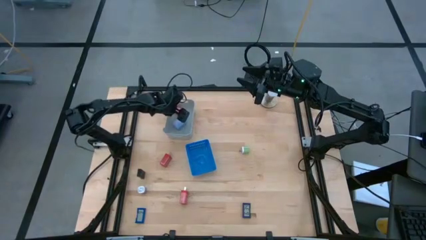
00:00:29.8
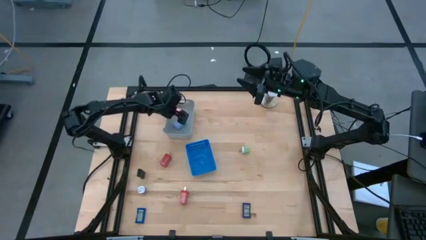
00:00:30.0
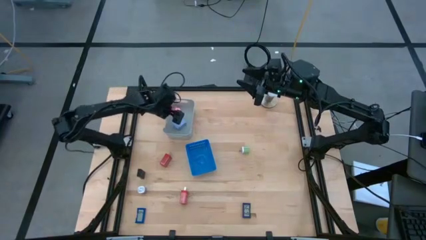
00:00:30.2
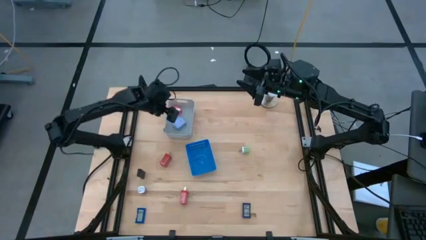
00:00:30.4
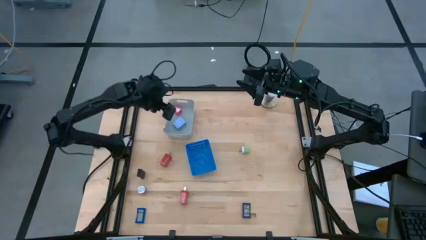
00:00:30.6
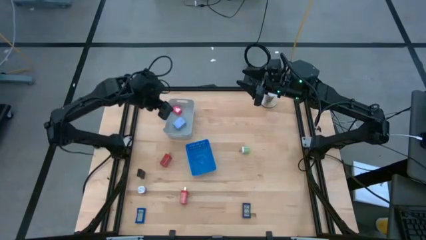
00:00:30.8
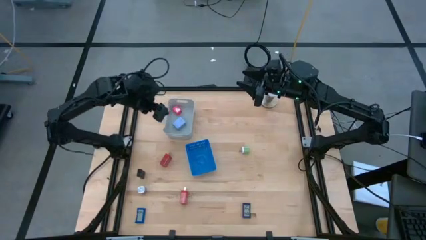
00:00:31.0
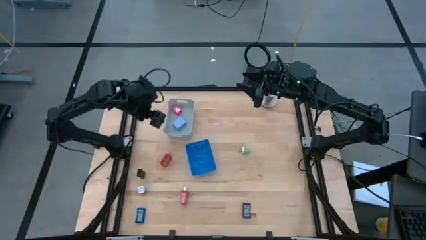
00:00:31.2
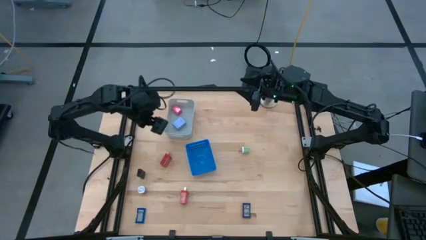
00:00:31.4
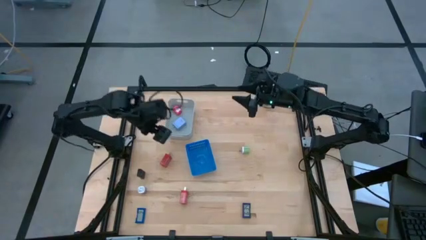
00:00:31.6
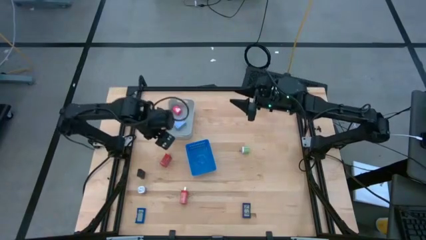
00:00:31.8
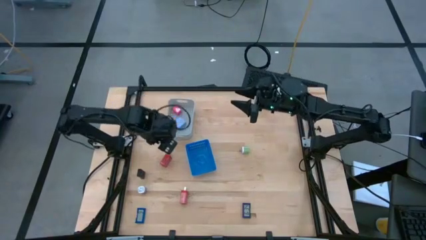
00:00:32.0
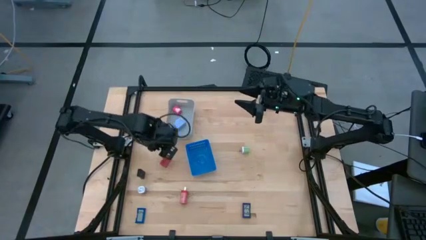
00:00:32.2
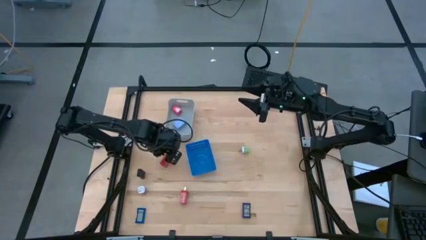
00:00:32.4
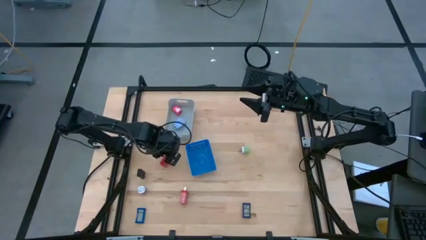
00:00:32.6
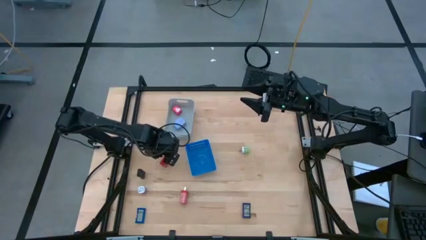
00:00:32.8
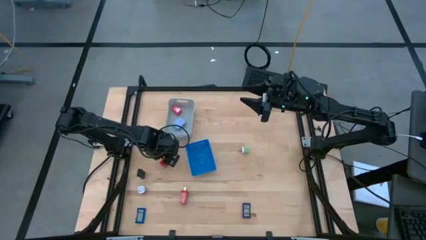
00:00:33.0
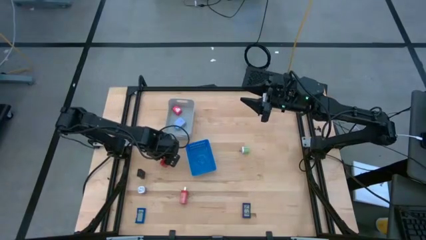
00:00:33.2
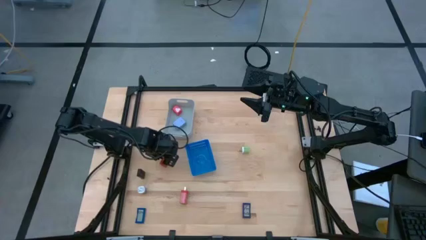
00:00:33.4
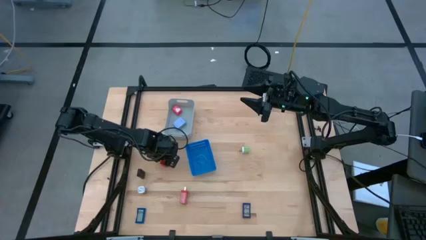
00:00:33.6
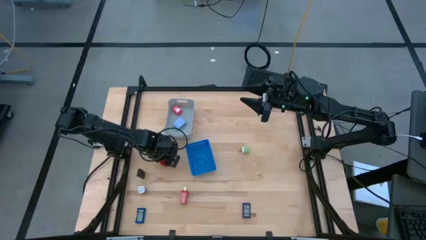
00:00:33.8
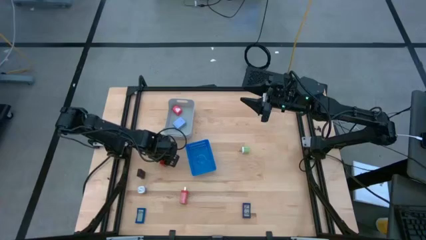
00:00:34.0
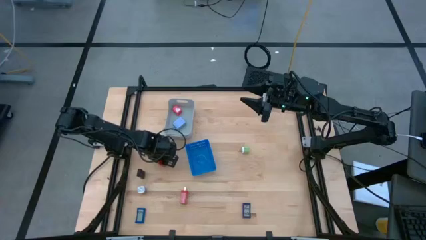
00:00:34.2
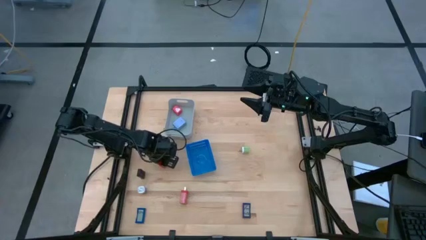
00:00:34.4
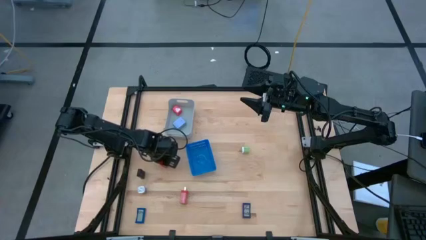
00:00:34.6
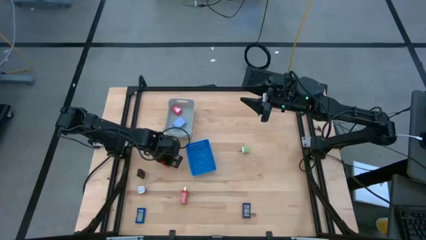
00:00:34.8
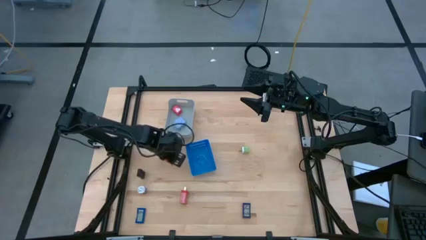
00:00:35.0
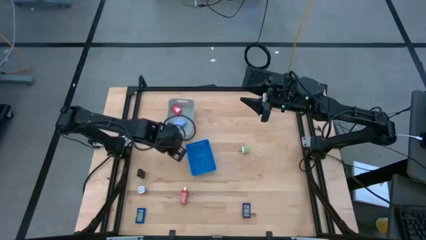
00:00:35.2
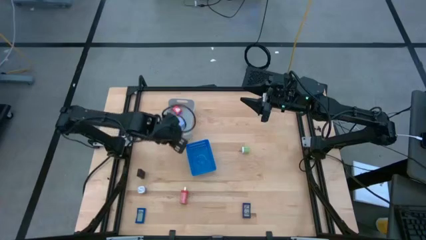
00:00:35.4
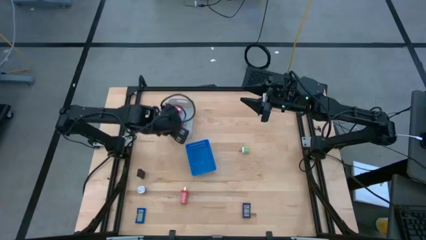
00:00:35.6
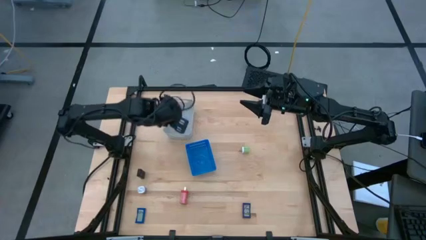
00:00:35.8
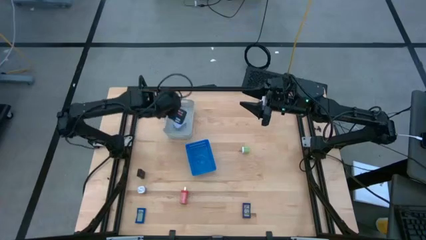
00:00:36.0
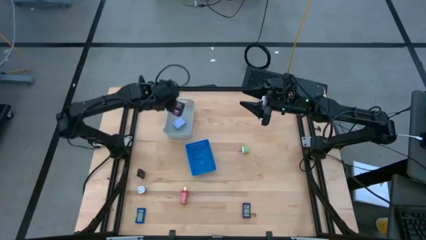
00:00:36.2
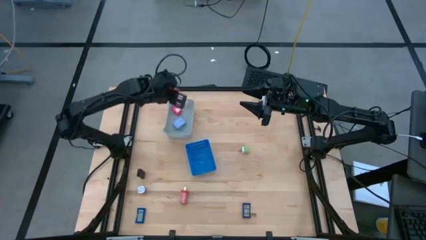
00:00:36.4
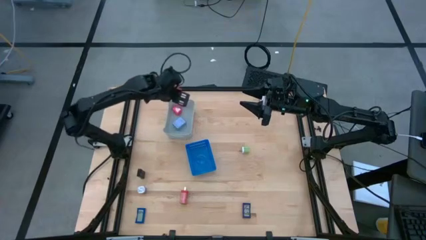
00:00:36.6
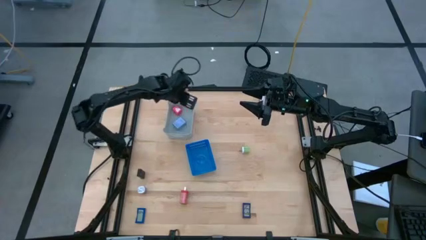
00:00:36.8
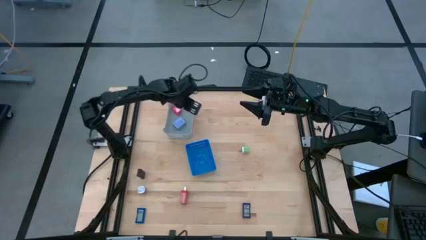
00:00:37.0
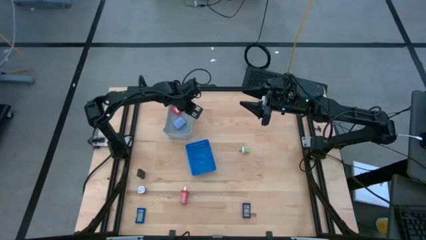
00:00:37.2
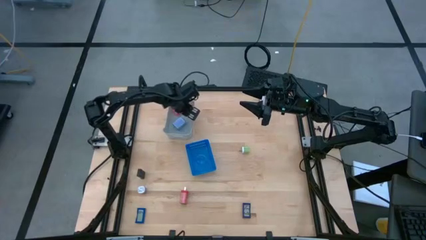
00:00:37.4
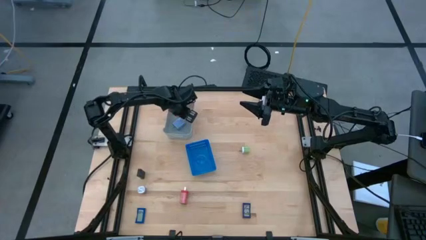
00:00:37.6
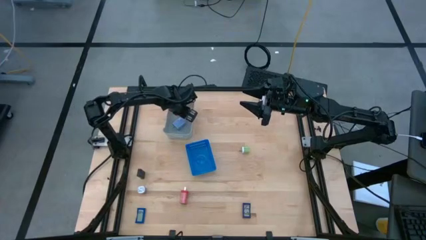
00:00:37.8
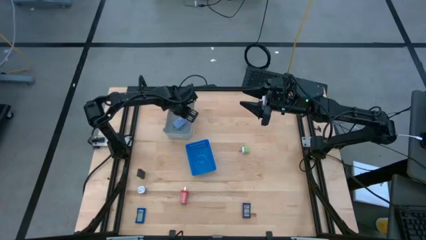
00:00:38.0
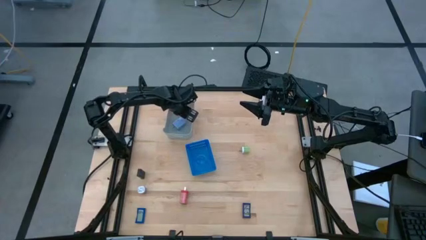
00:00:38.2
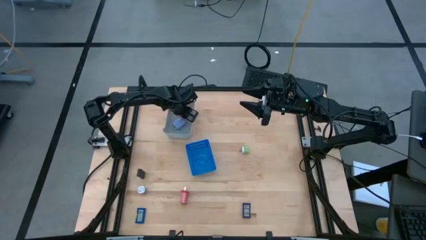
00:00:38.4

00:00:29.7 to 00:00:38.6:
Task: Pick & Place Office items
Put the top red charger adapter into the gray bin

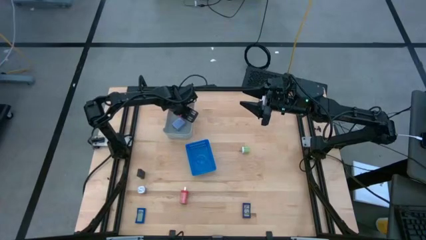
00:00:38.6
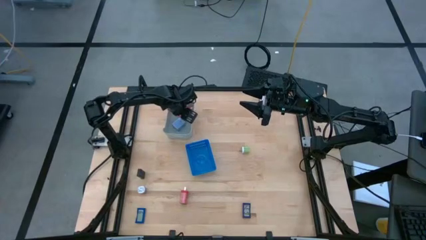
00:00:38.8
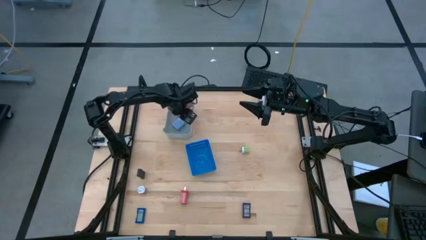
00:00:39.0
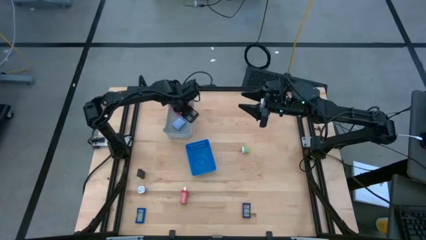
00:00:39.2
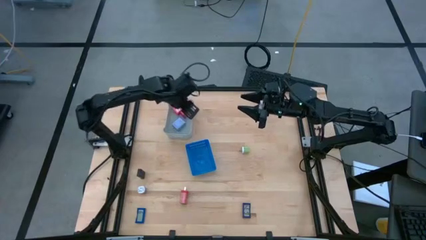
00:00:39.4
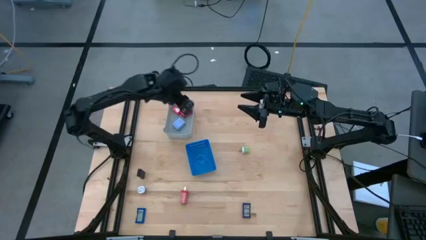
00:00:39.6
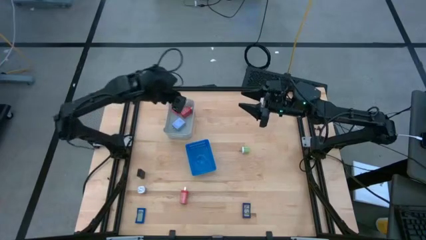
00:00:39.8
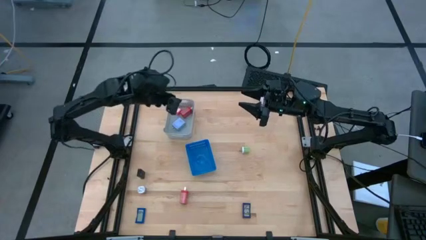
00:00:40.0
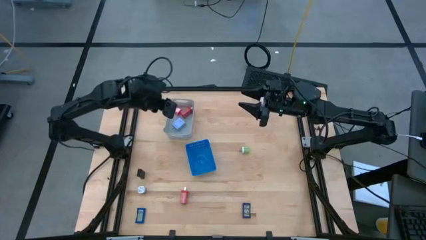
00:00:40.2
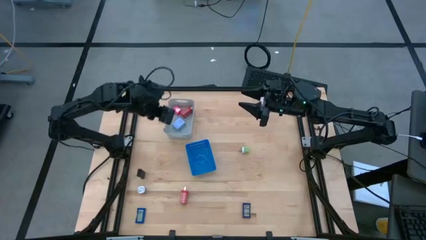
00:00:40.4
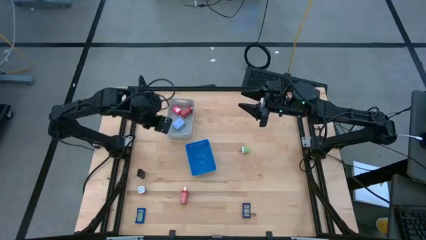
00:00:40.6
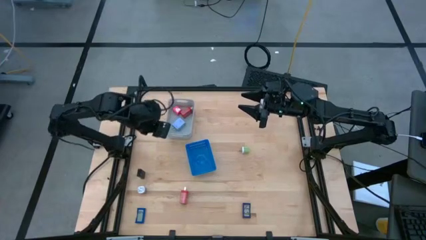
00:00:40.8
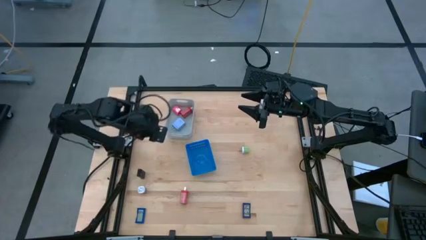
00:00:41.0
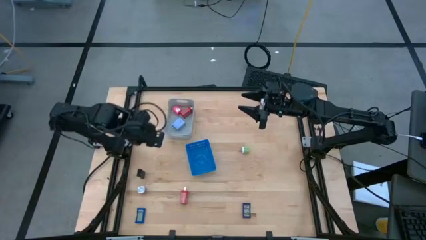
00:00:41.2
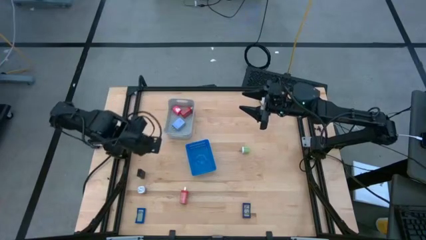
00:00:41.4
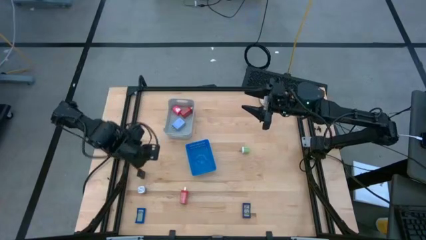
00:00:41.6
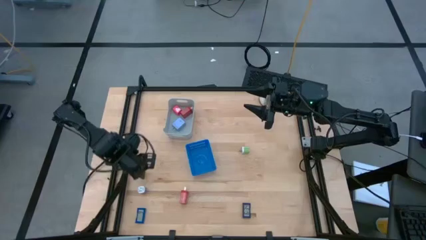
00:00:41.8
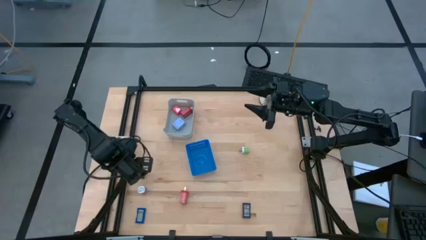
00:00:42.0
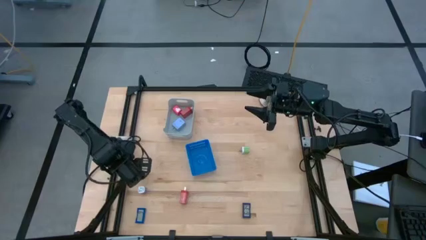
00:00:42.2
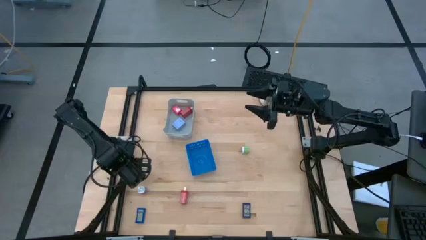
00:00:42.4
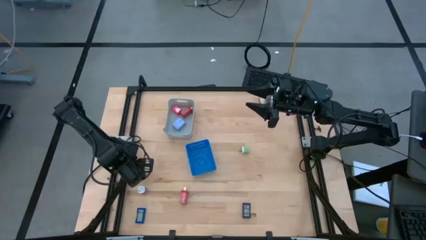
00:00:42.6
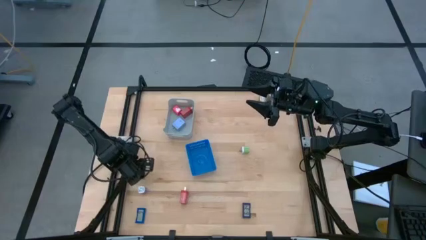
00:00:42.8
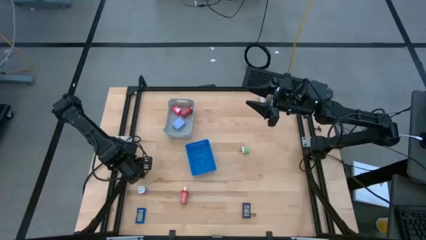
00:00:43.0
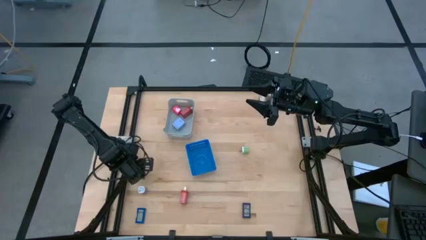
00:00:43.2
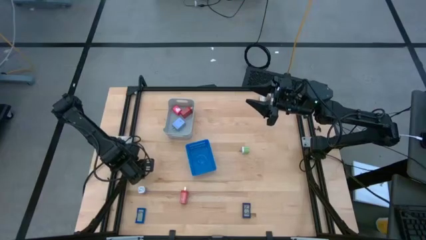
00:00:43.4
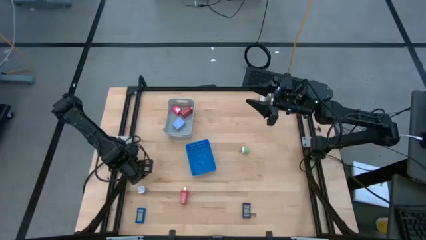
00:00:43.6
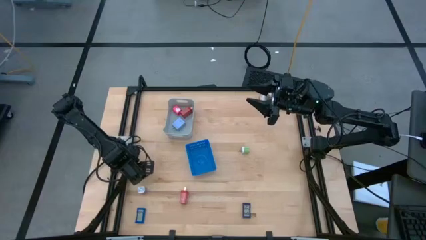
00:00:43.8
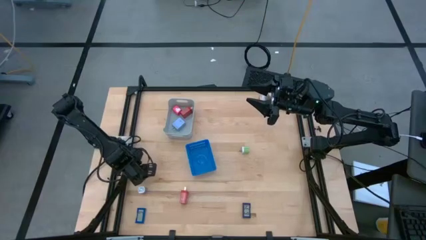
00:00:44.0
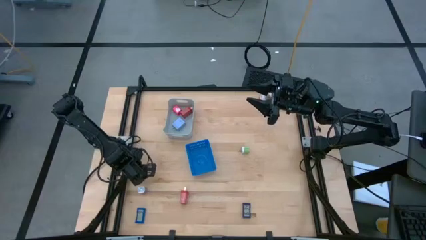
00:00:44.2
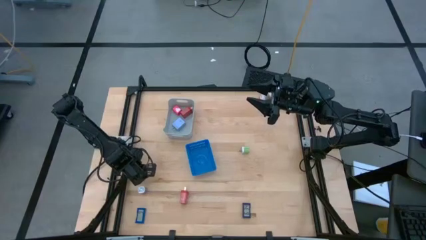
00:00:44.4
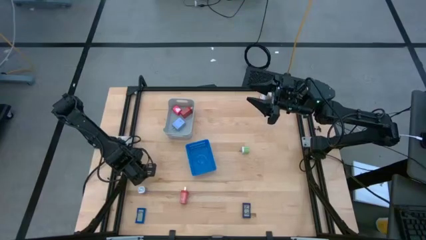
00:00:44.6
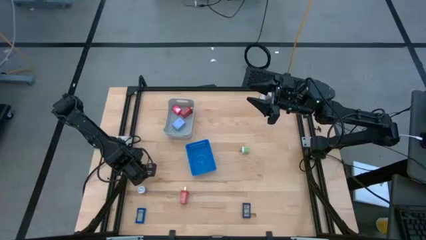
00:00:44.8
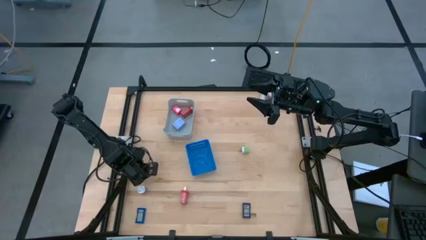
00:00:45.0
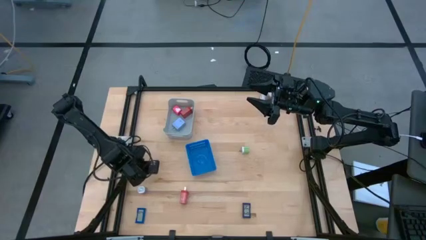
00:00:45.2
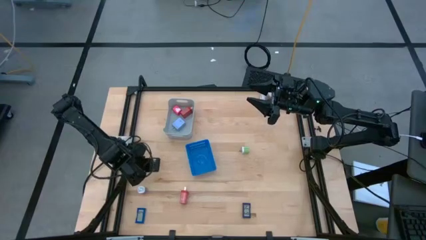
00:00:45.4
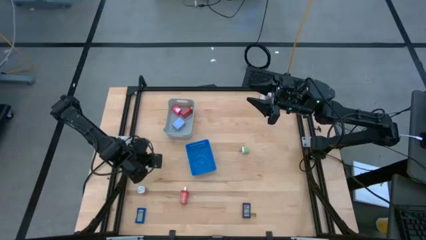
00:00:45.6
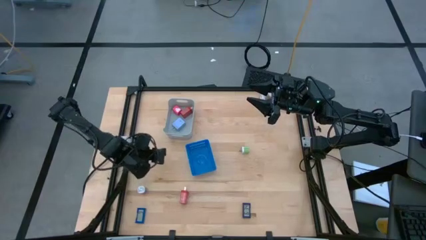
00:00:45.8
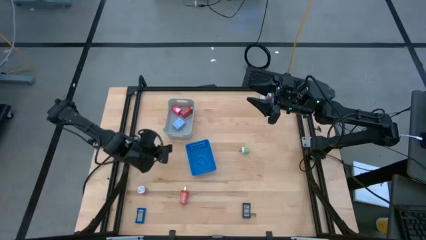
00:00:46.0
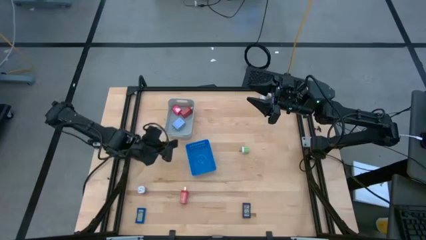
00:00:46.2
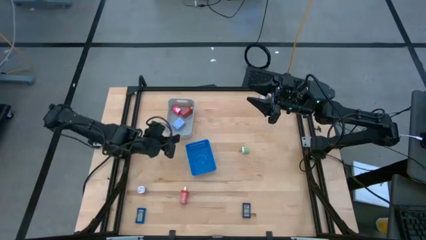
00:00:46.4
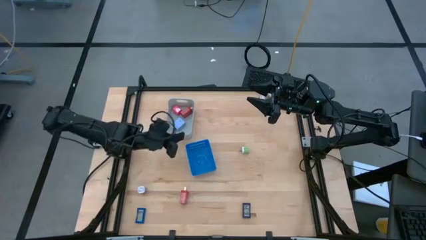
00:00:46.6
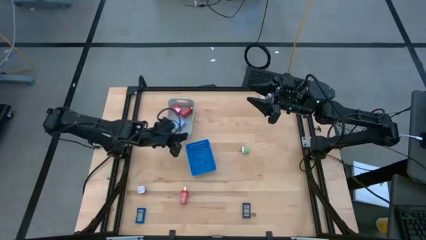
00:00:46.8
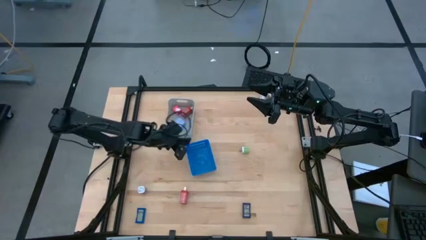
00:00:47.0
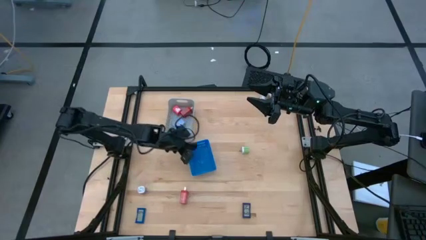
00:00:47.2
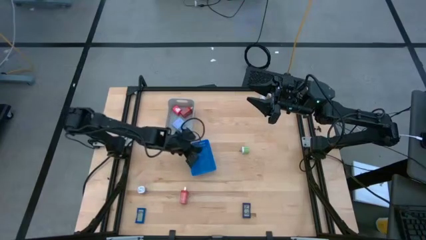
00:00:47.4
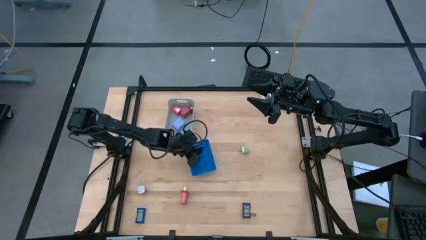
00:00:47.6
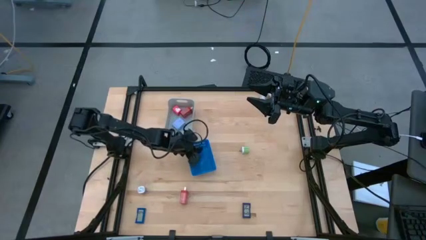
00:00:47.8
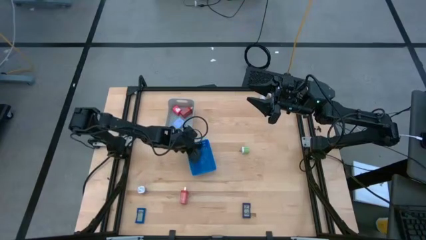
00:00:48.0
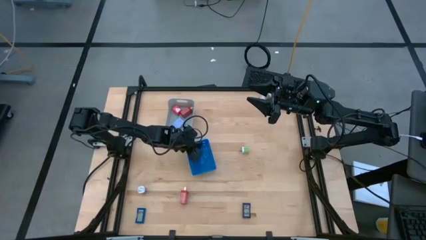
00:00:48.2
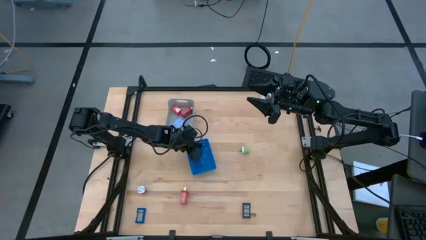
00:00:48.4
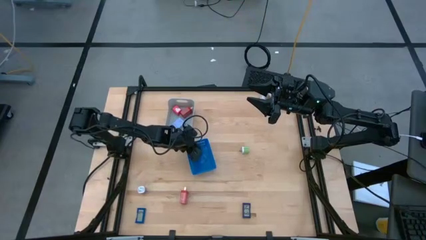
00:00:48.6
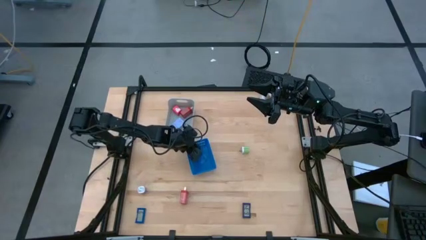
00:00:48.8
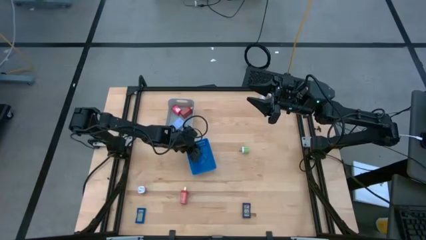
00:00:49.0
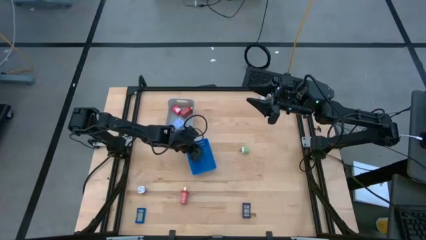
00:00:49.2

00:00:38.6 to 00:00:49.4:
Put the black digital timer into the blue basket
